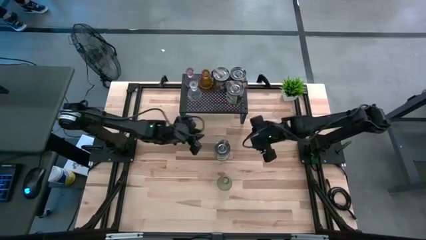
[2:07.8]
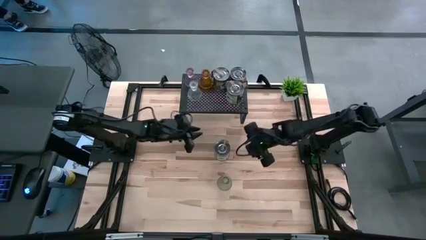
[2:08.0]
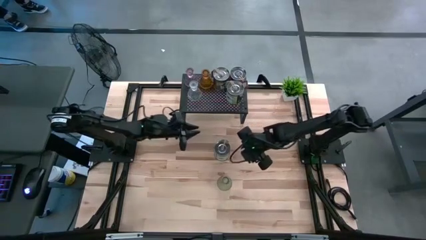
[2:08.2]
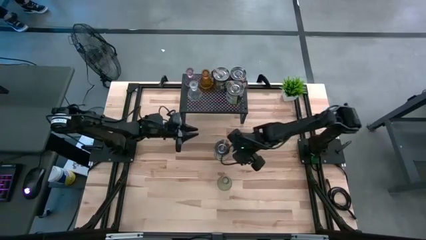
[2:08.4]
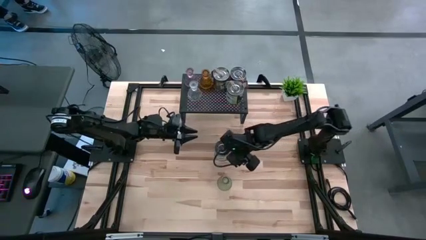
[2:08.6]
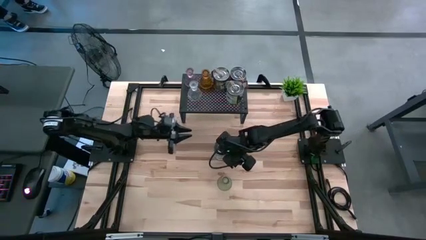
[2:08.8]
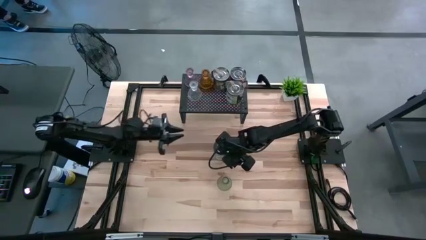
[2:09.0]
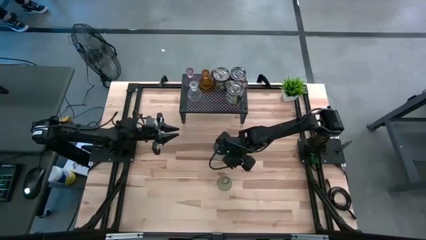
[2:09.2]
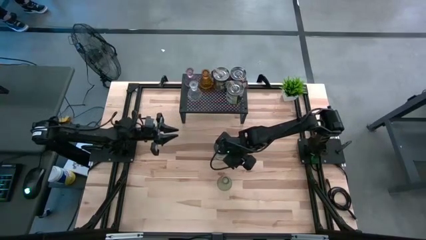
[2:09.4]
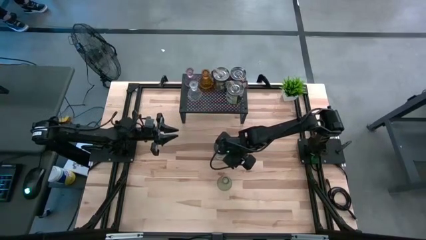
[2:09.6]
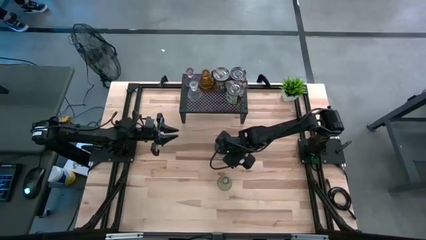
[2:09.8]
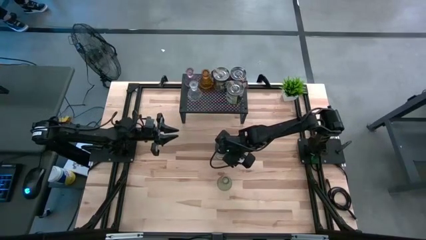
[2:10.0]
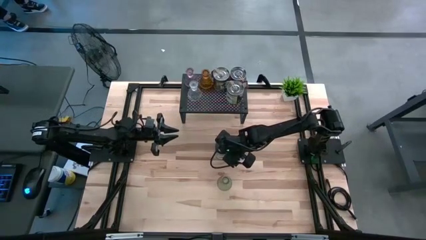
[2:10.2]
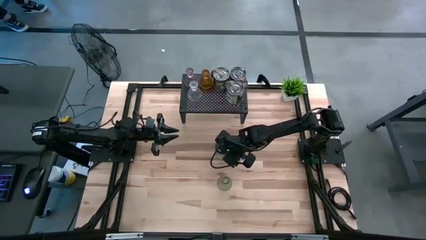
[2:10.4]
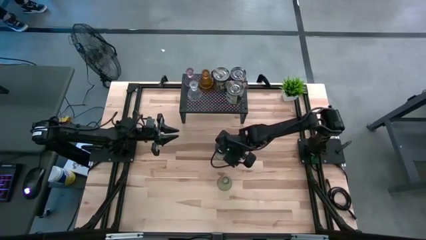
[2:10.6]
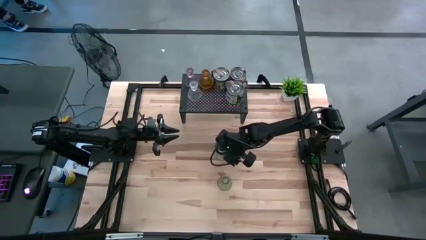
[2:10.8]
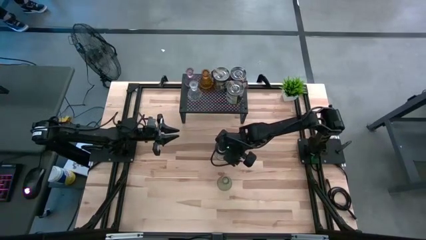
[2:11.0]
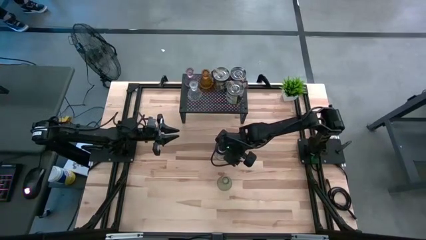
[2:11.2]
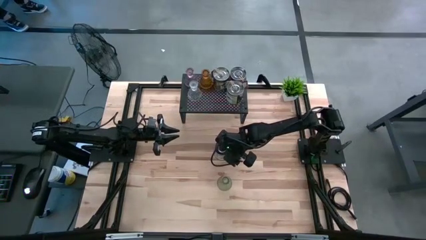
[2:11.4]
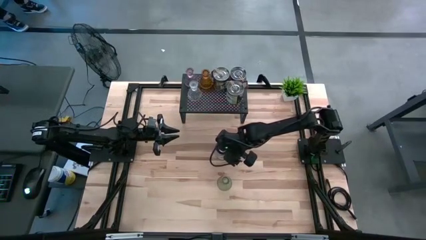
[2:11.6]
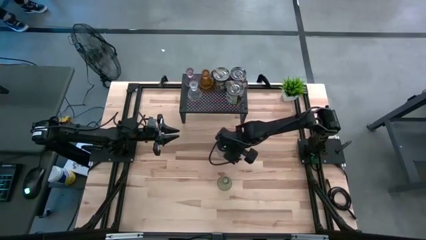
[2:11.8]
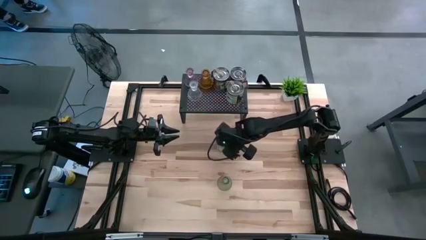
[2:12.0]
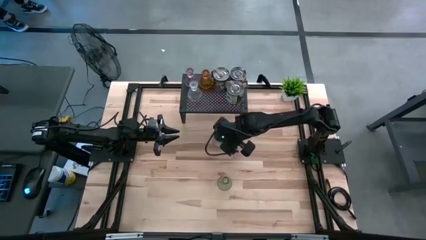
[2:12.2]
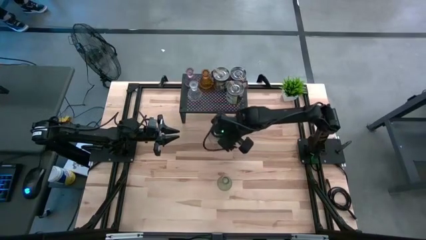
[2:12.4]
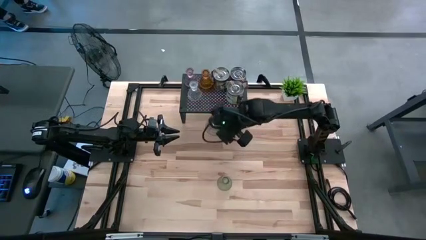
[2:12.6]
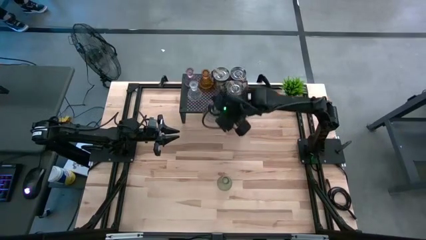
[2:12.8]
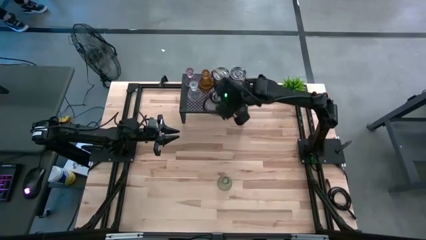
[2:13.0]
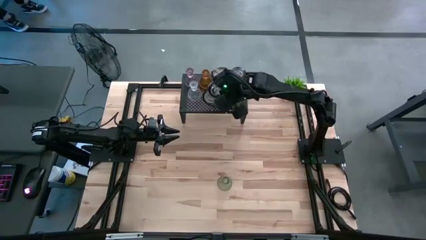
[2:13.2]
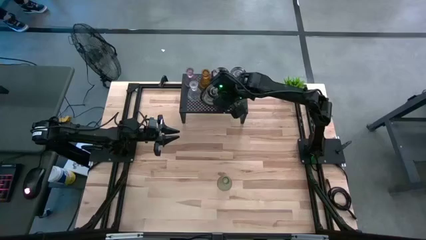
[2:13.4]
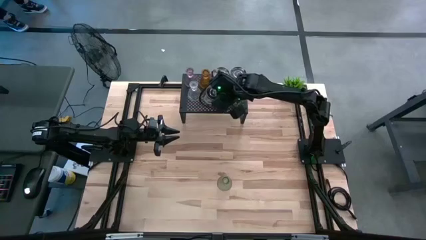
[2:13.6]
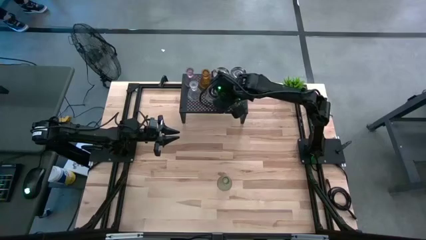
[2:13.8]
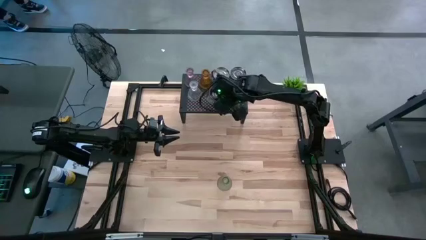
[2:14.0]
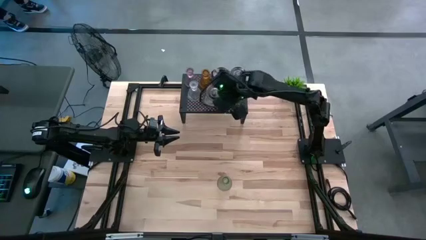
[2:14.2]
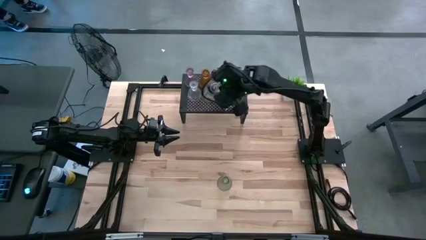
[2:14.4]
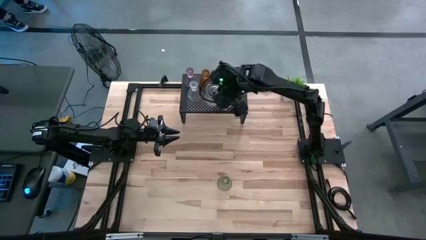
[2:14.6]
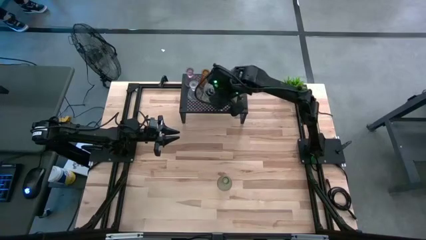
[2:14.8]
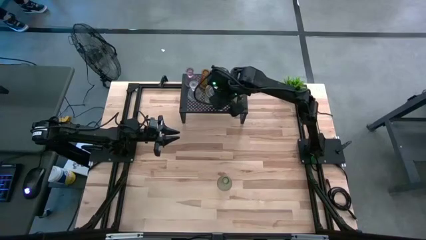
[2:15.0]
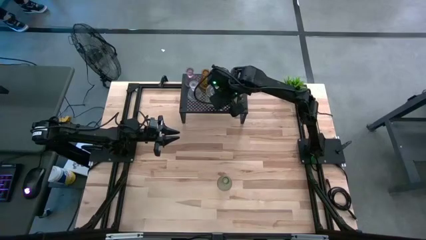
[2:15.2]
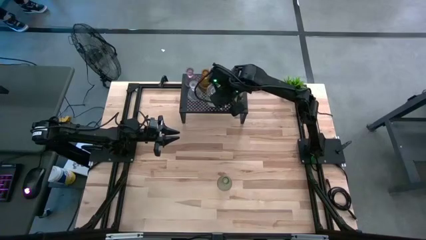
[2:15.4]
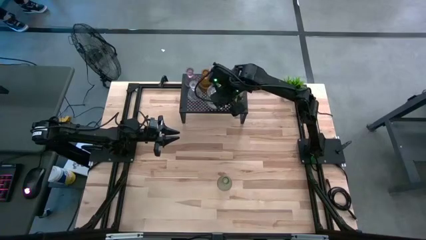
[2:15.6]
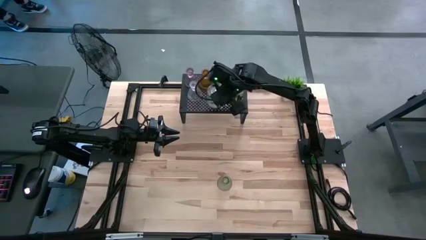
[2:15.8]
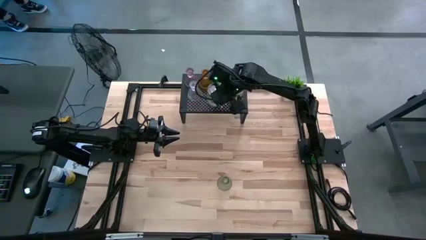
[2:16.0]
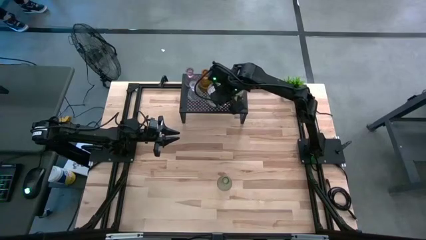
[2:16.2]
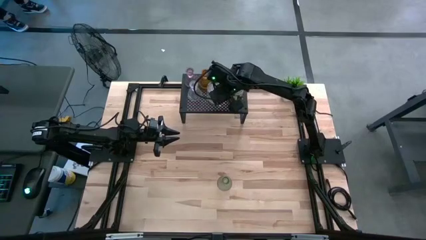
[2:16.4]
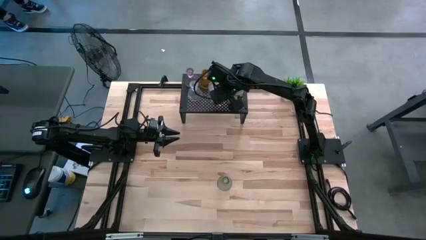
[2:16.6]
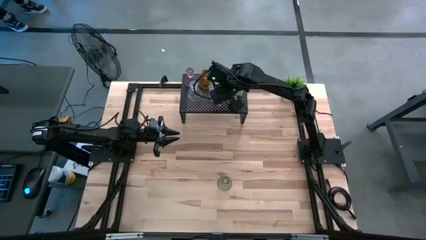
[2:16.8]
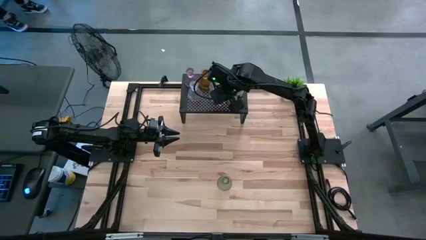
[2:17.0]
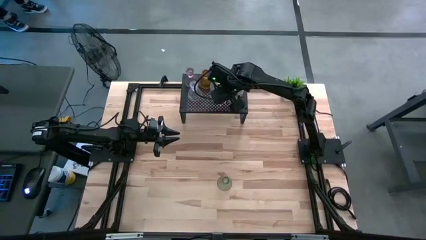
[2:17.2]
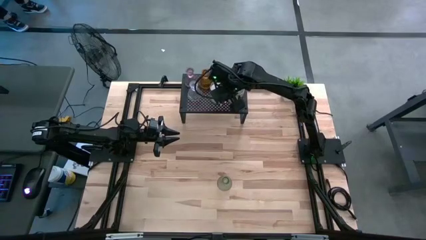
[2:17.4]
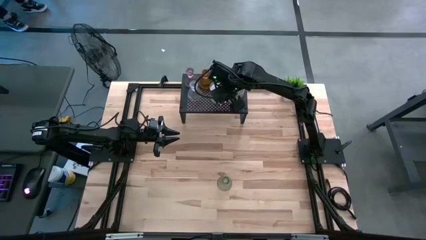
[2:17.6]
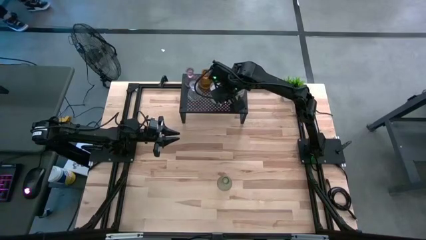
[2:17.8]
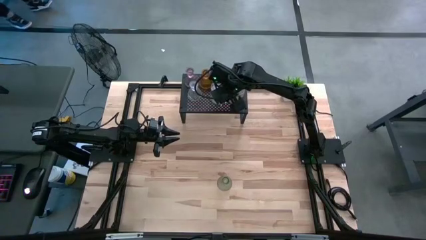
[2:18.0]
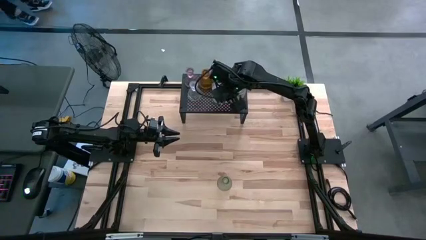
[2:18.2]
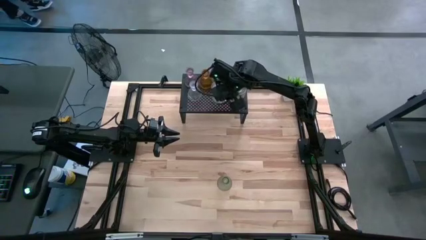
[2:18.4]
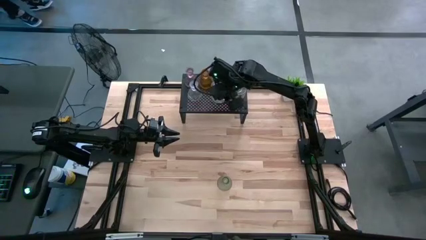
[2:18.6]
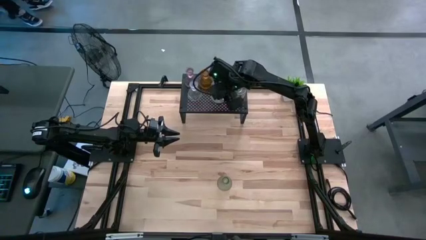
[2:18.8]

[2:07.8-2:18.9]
Task: Pick & Place candle stick holders
Put the green scented candle on the shelf aligned with the other scented candles
